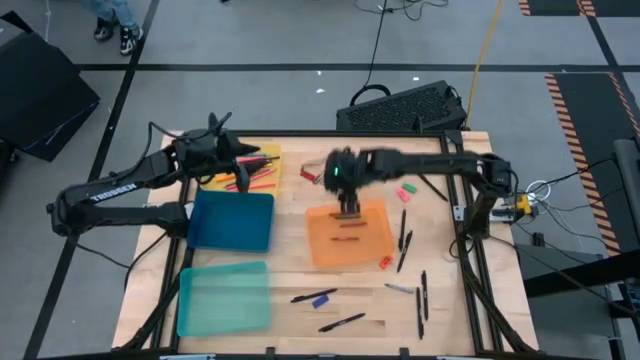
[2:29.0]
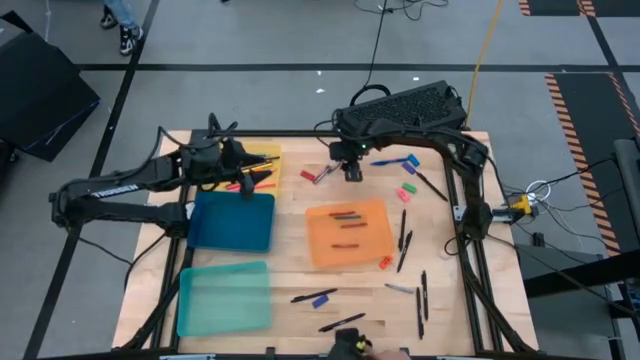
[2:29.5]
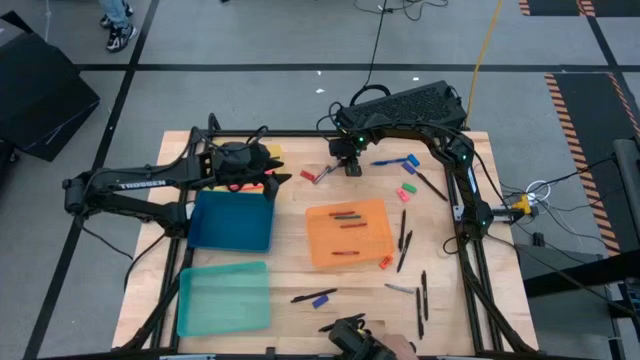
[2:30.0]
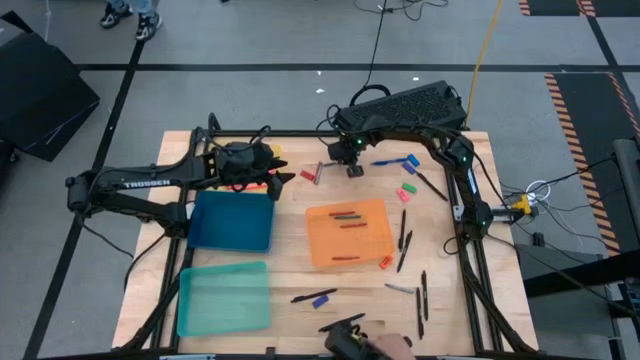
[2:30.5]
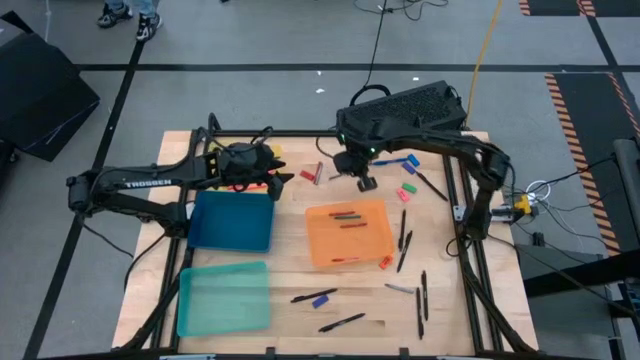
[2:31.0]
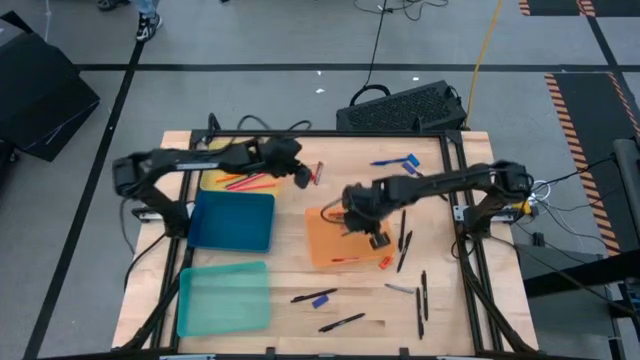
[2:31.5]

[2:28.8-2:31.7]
Task: Sort crayons/erasers/pens/pencils in bins
Put the green crayon into the orange bin

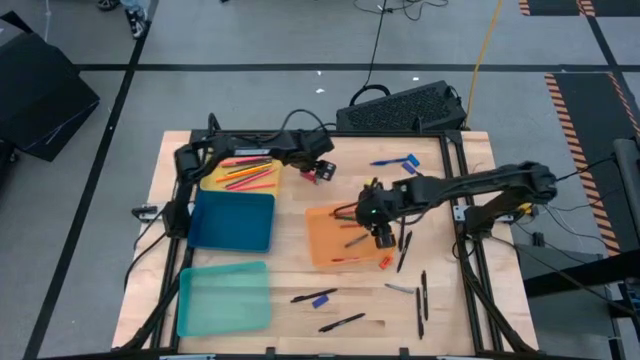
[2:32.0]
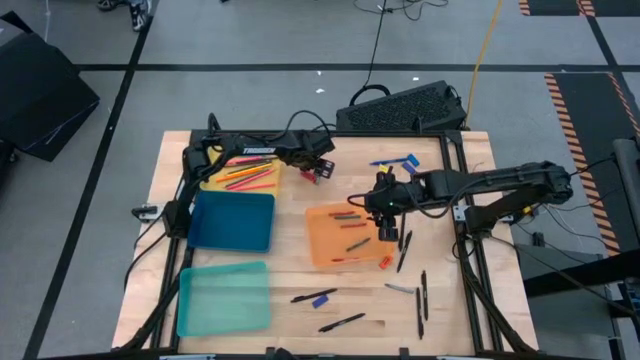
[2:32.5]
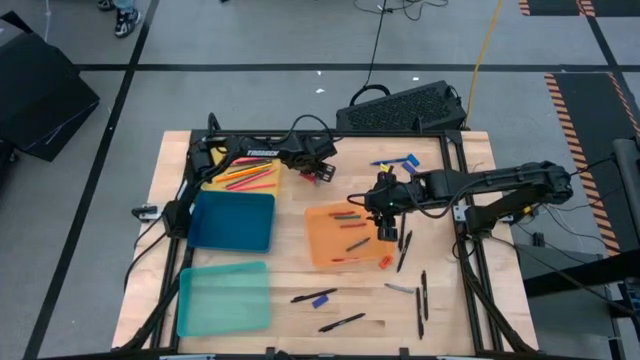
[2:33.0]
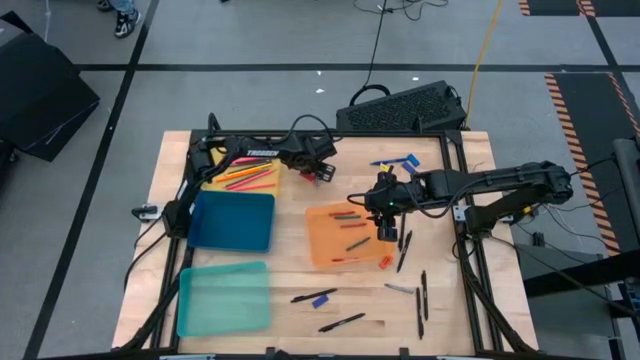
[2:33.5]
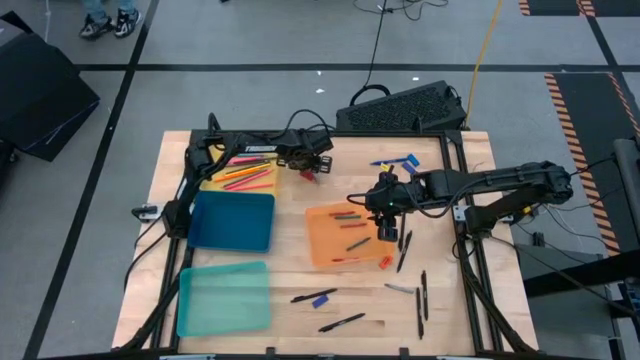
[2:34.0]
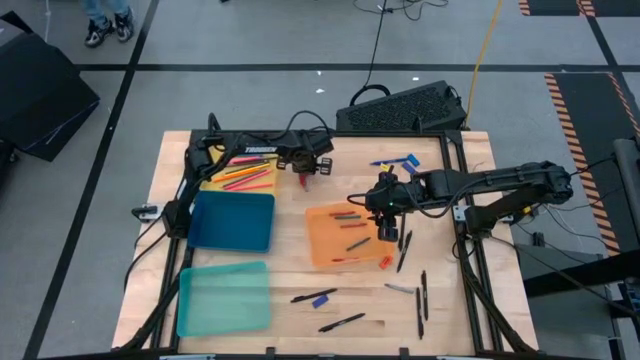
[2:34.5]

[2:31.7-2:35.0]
Put the gray crayon into the orange bin

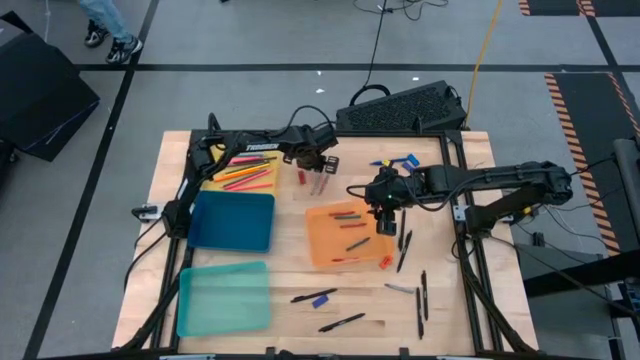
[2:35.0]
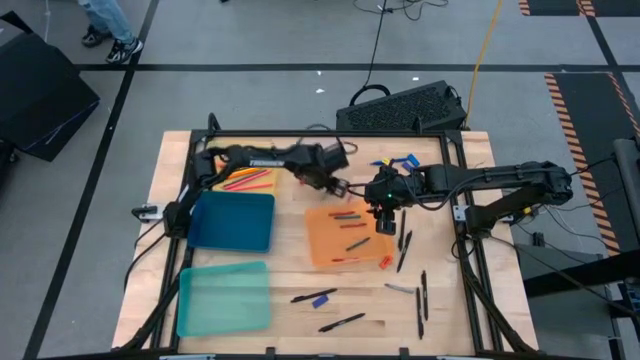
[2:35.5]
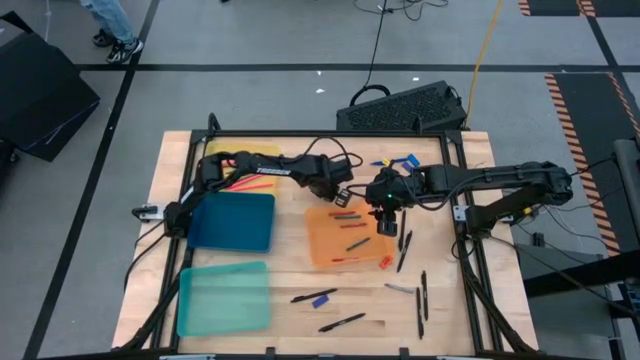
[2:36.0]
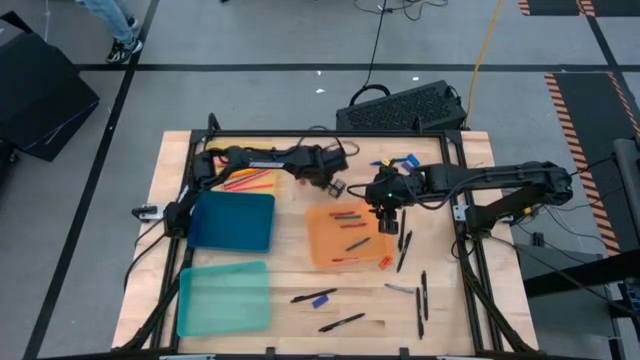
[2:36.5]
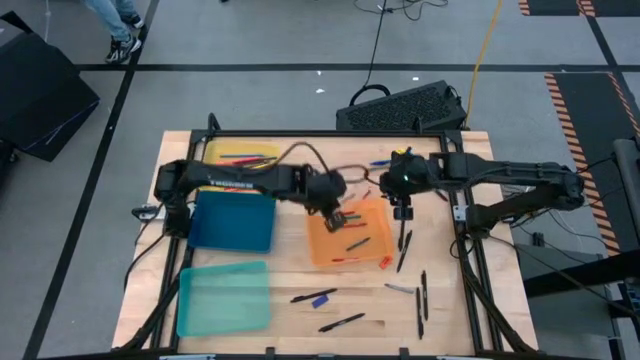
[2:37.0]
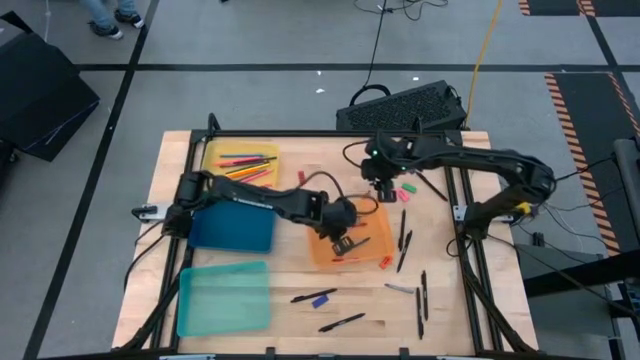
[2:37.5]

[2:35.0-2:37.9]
Put the gray crayon into the orange bin

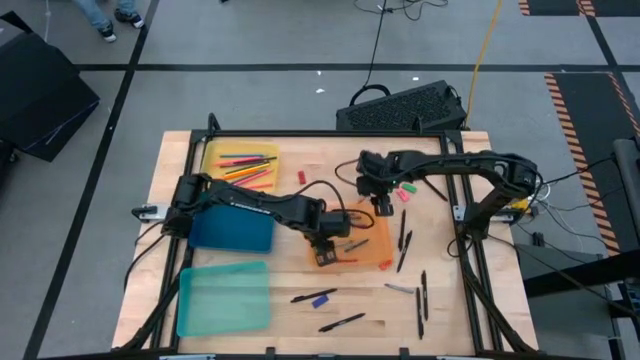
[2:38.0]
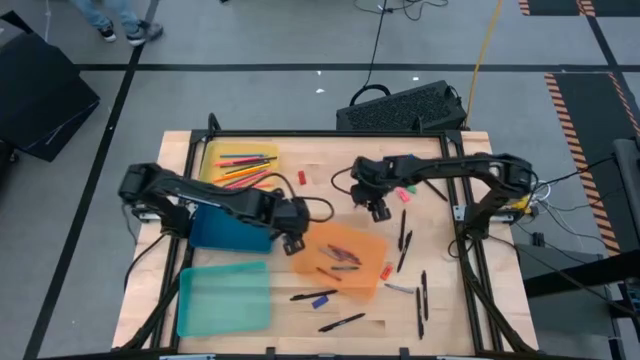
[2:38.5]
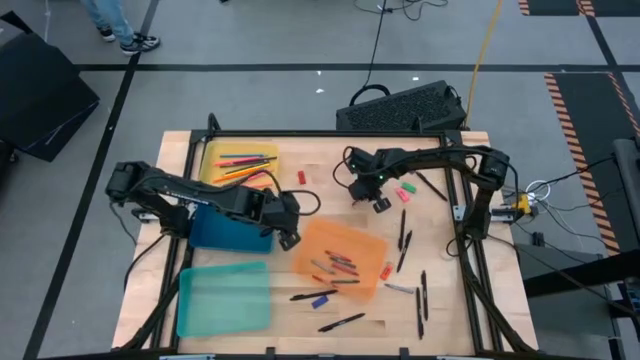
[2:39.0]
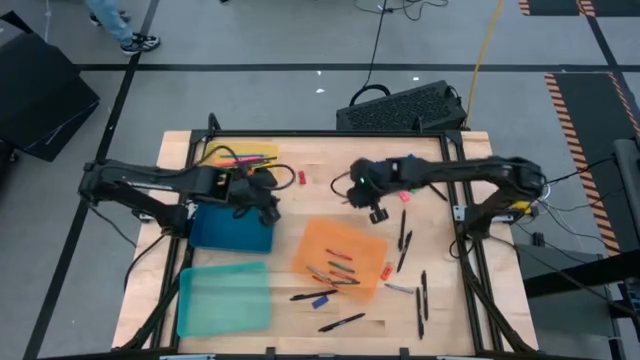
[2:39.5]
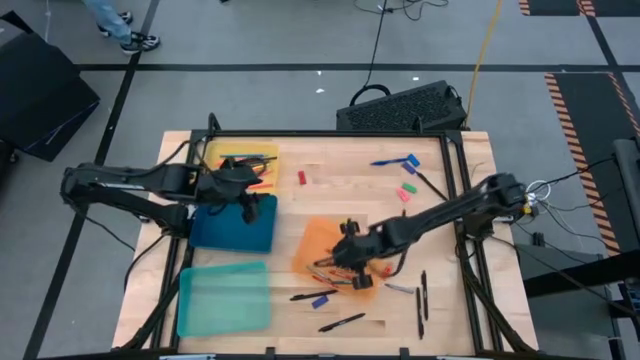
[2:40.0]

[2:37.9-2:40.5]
Put the red crayon into the orange bin

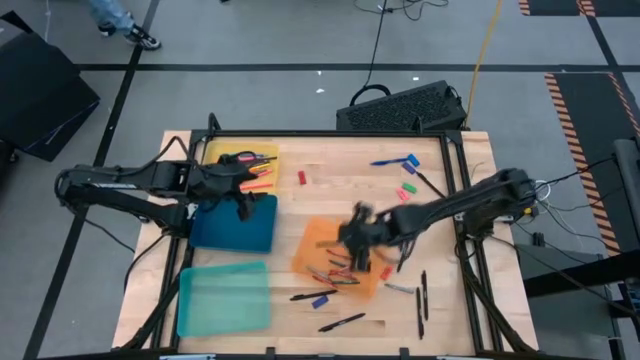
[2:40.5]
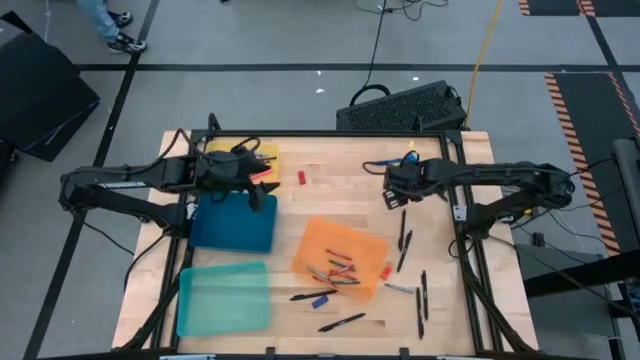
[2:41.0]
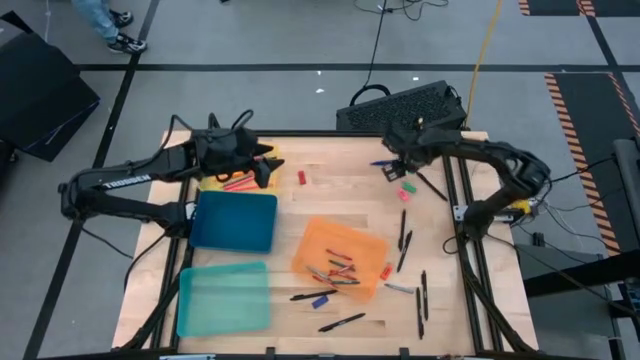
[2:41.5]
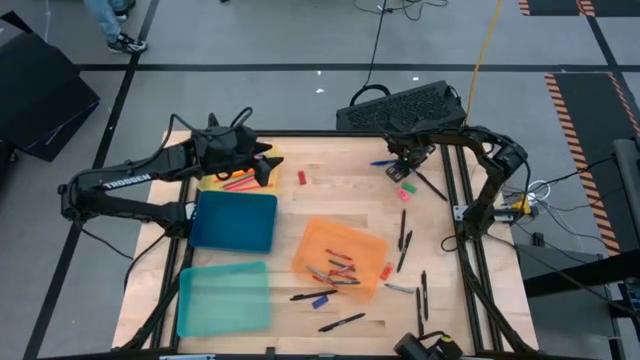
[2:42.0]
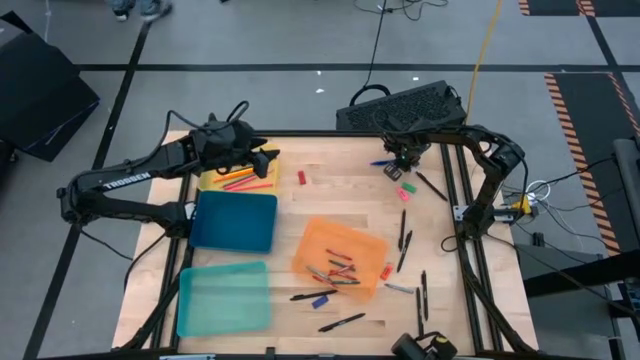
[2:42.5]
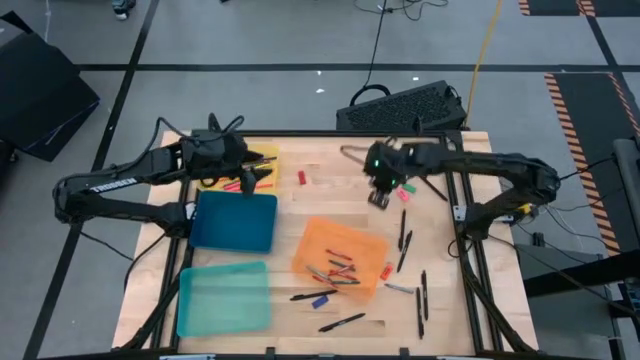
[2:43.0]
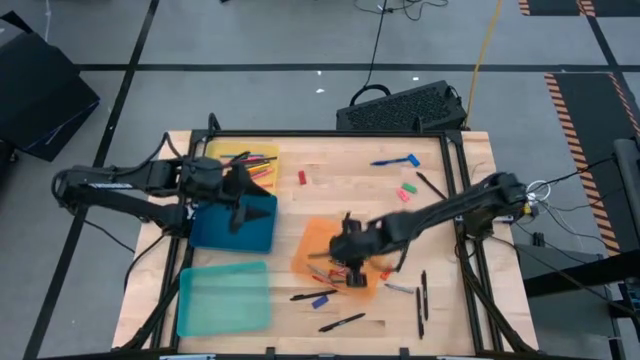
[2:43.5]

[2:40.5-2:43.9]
Put the purple eraser into the blue bin

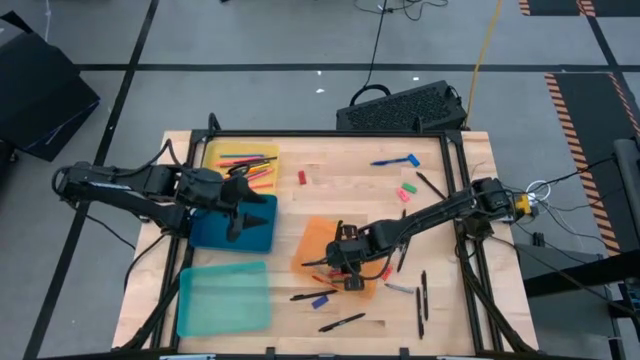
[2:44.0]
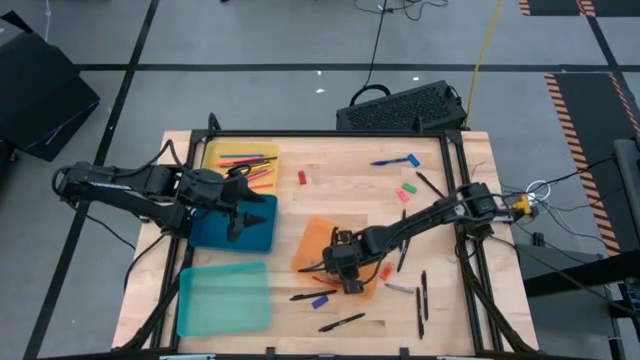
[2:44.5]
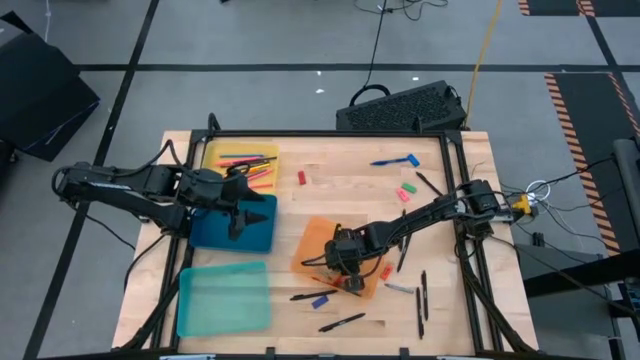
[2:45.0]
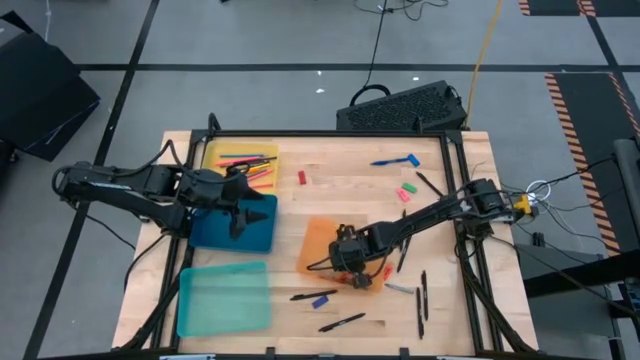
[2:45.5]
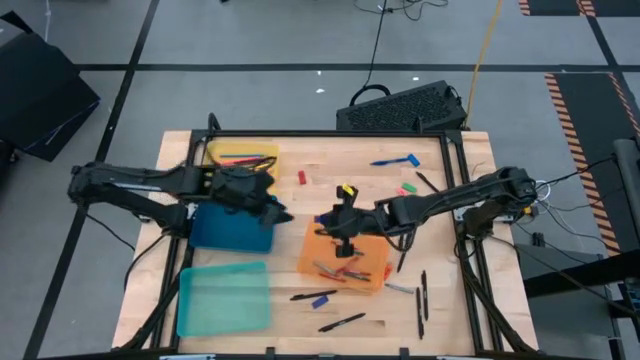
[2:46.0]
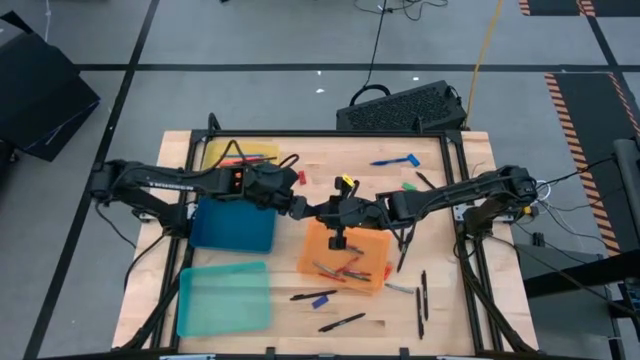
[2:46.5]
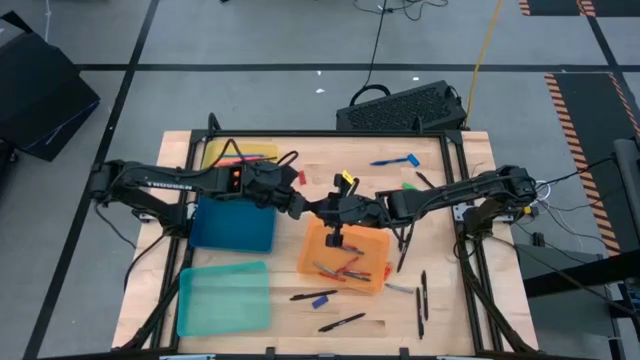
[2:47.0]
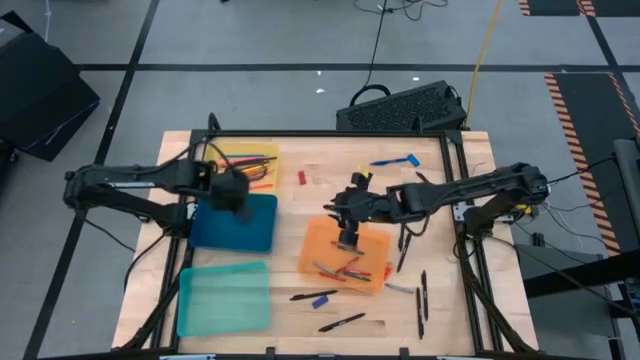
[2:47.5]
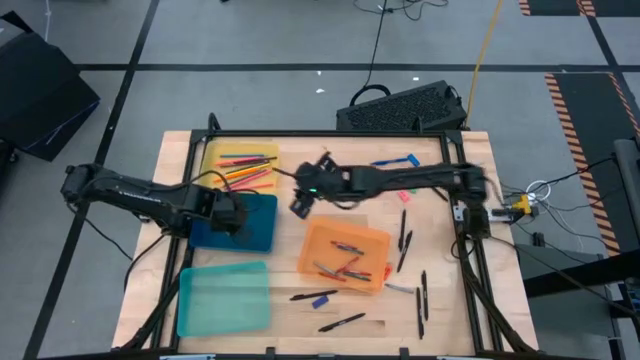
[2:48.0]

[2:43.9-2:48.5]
Put the purple eraser into the blue bin

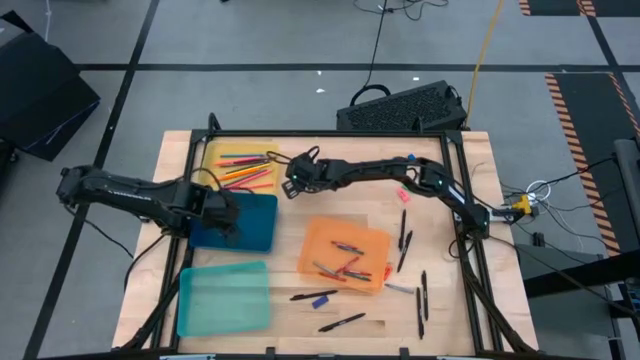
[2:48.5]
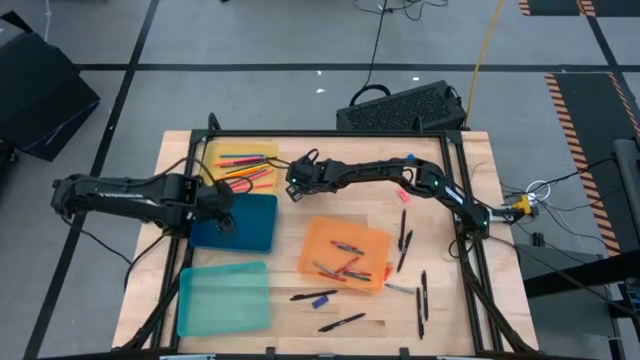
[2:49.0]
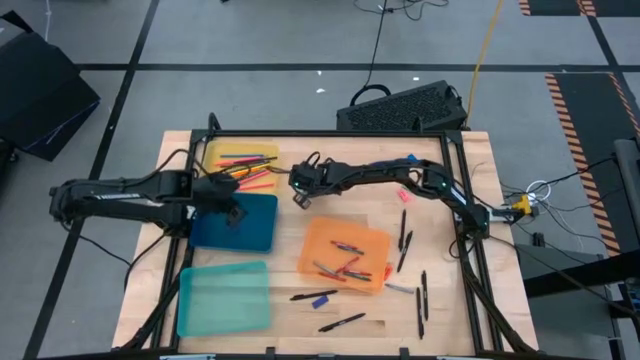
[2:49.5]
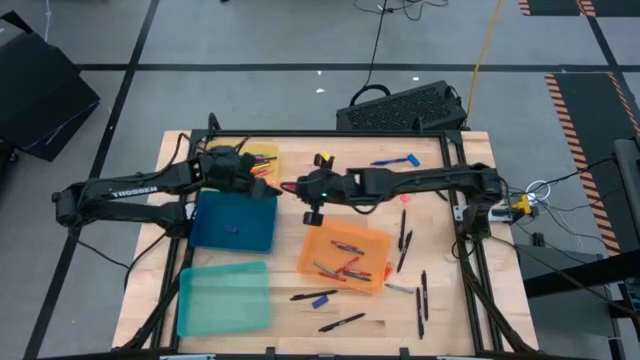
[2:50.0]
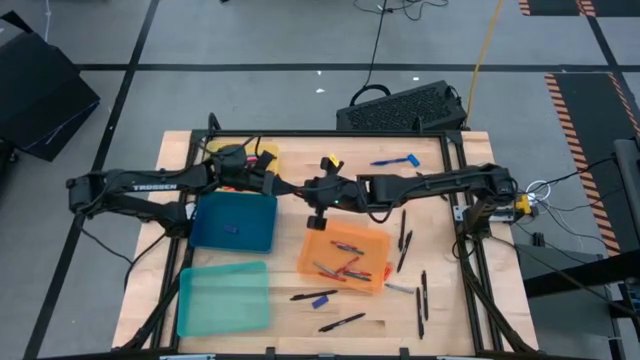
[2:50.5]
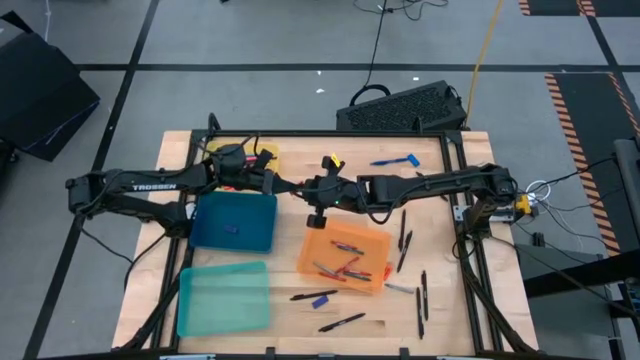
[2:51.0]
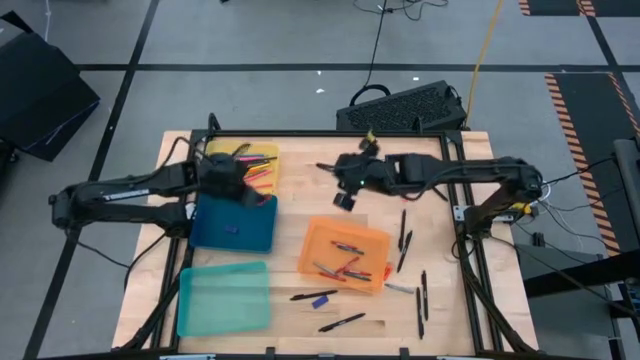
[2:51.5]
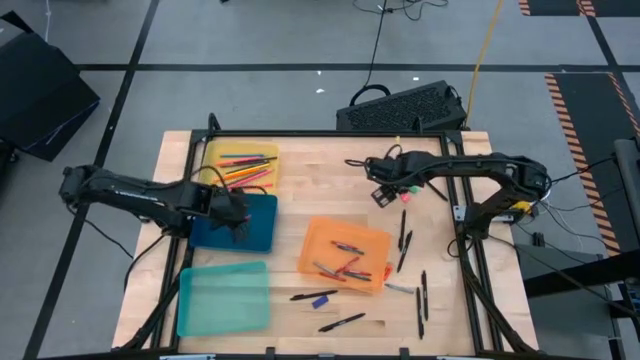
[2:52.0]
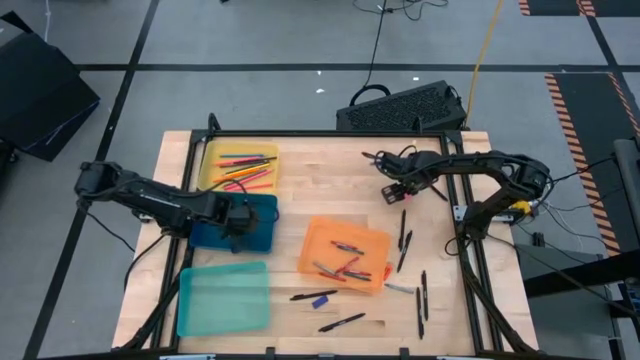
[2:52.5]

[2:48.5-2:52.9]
Put the red eraser into the blue bin
